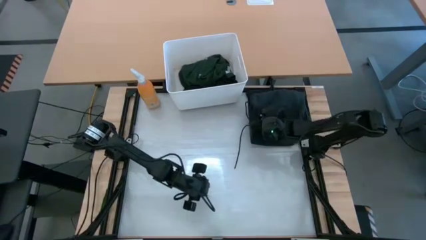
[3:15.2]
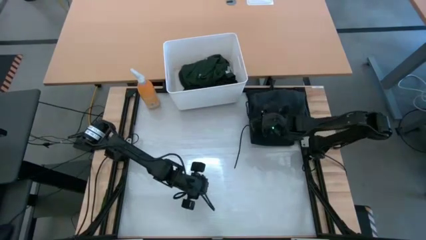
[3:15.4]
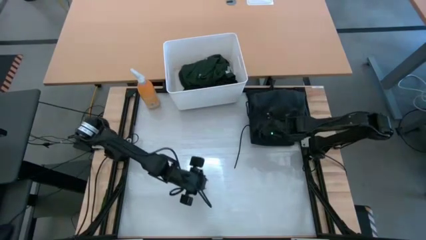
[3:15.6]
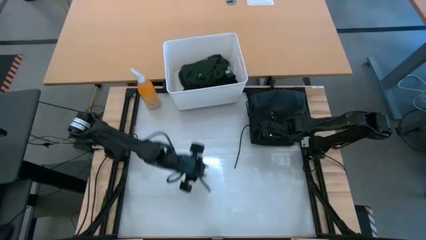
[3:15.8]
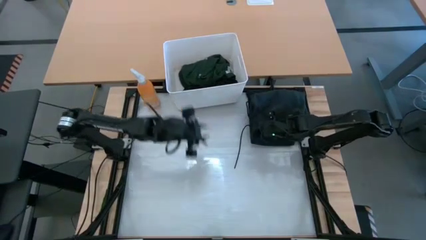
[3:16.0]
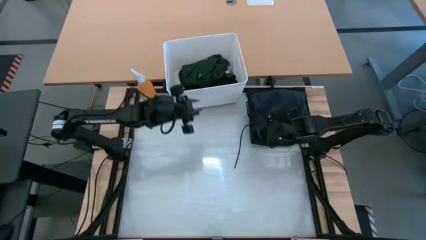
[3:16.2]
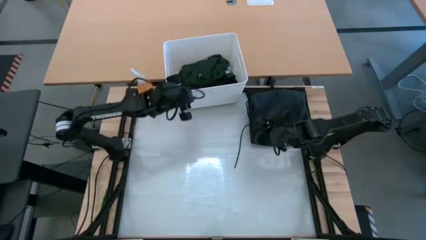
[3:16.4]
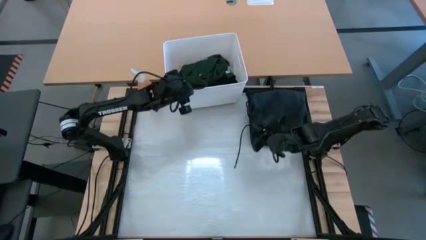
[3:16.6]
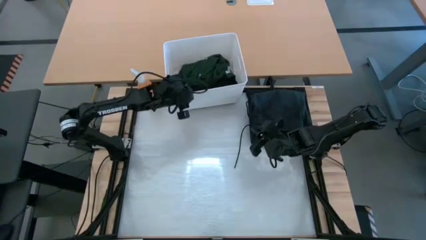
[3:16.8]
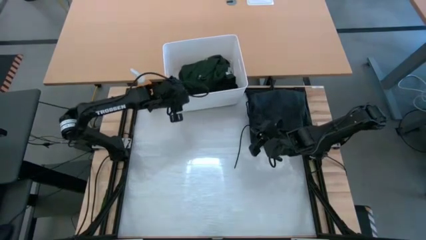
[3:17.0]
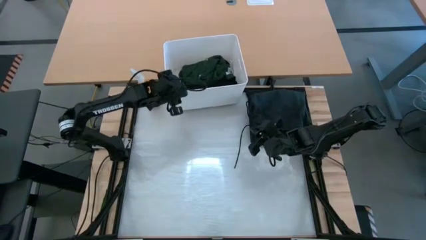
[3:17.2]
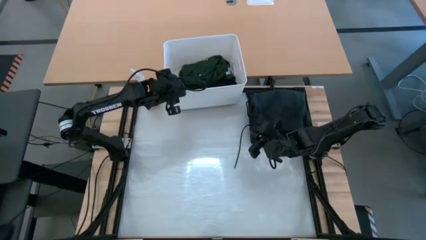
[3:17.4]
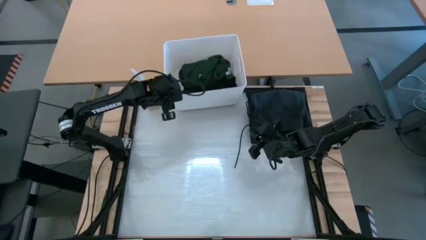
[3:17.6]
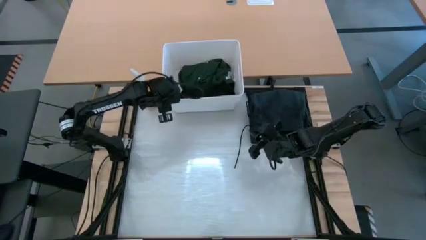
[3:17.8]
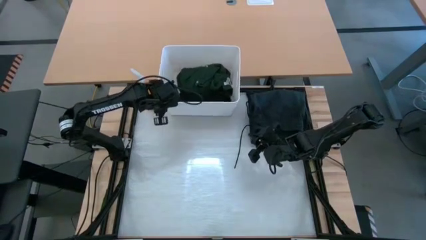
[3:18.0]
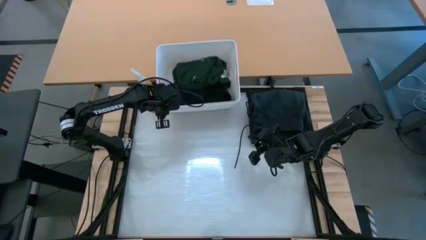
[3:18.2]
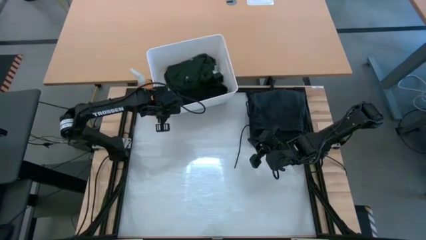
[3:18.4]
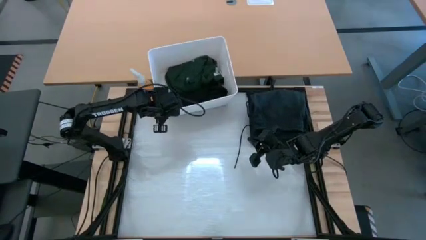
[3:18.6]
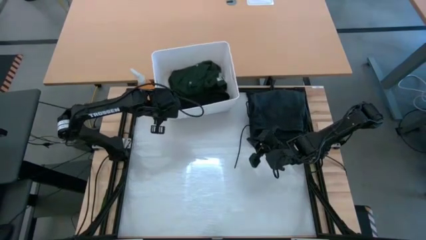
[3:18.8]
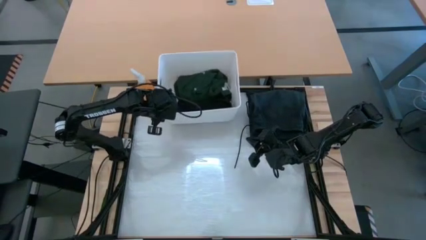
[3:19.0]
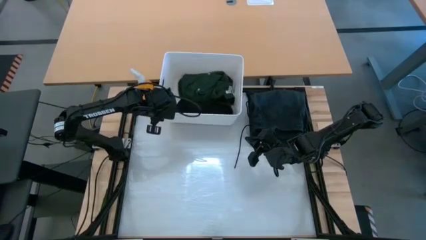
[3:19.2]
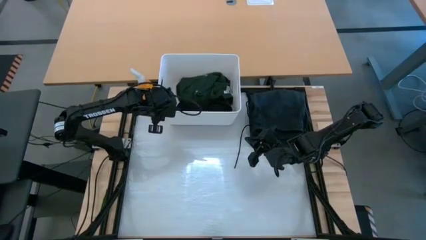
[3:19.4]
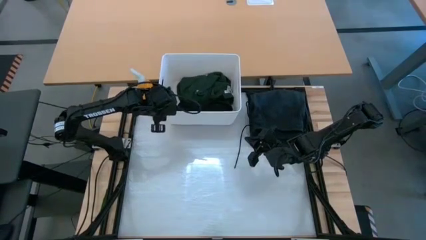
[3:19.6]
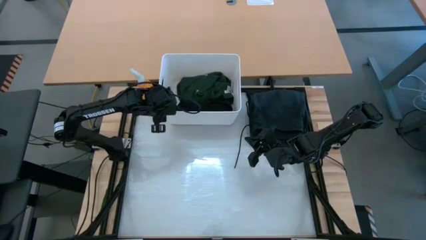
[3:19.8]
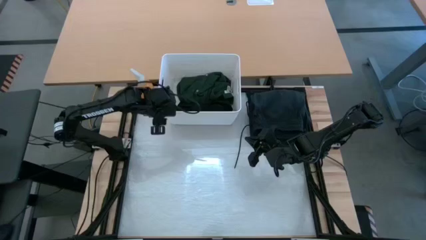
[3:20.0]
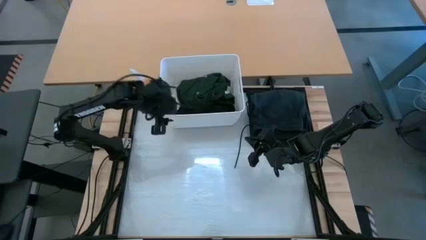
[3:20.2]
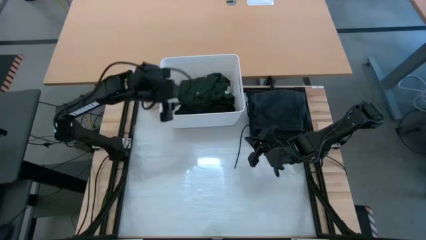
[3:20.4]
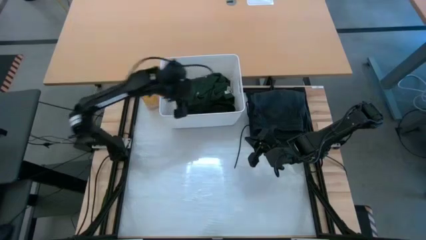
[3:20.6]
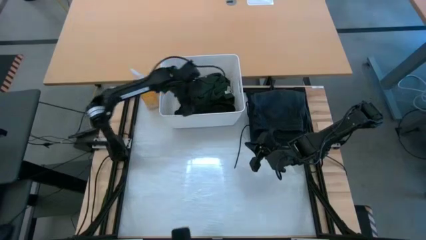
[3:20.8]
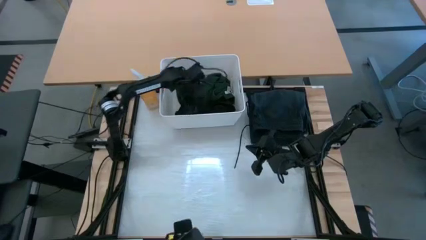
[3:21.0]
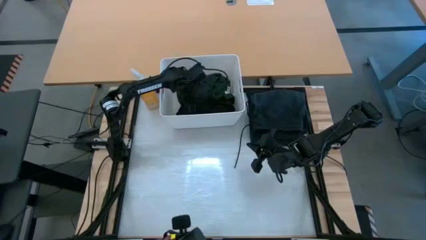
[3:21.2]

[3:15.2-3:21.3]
Task: Fold laundry
Remove the green polo from the white bin

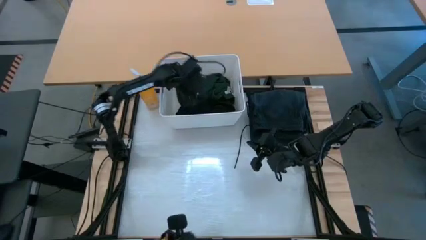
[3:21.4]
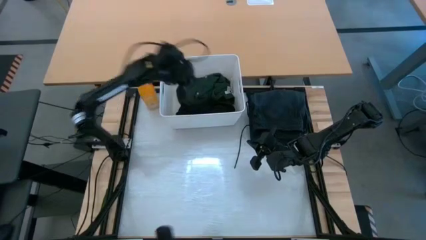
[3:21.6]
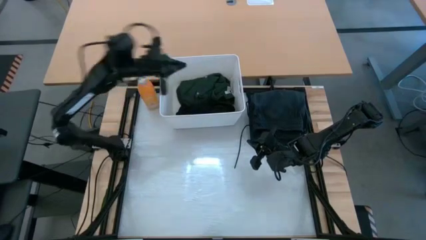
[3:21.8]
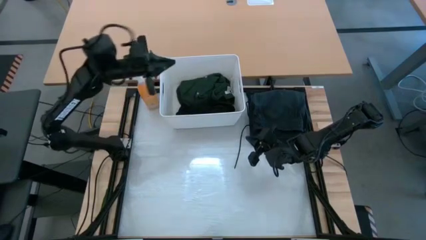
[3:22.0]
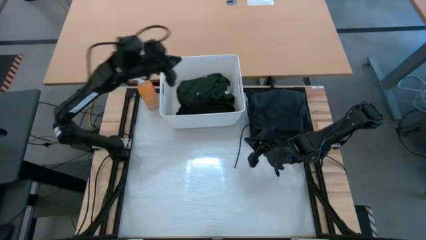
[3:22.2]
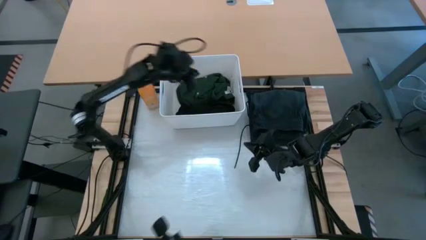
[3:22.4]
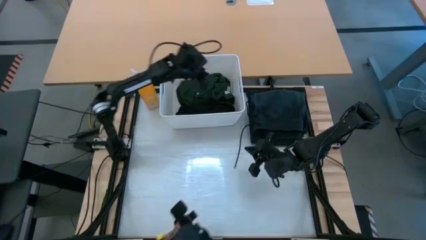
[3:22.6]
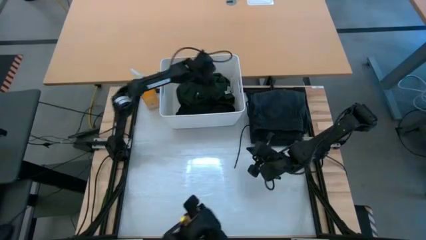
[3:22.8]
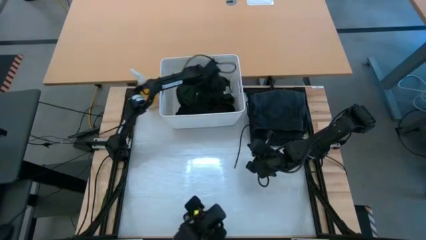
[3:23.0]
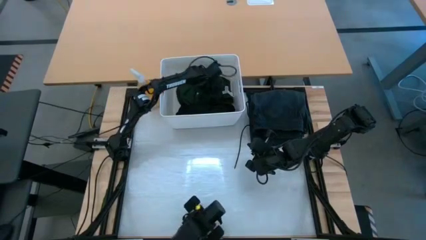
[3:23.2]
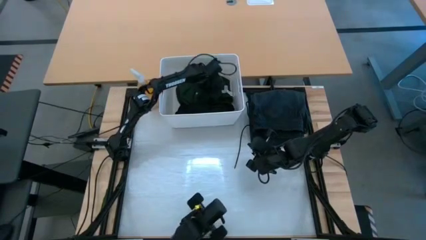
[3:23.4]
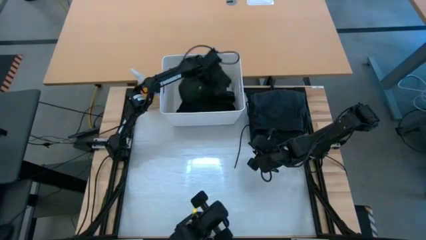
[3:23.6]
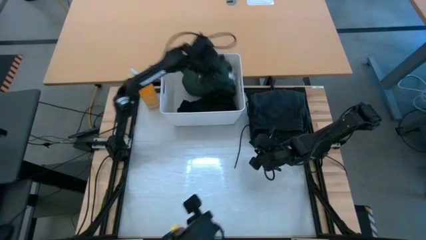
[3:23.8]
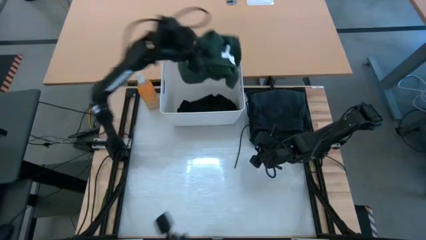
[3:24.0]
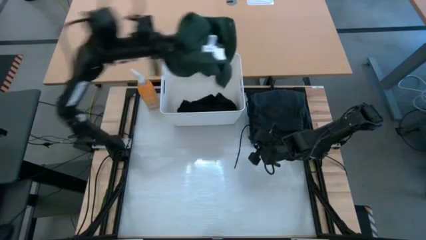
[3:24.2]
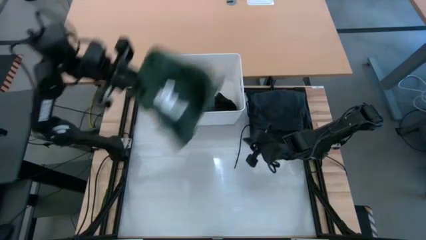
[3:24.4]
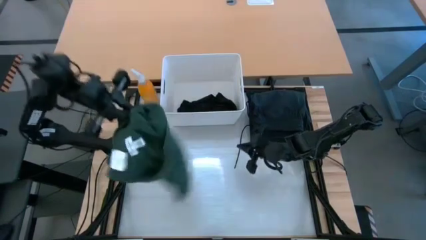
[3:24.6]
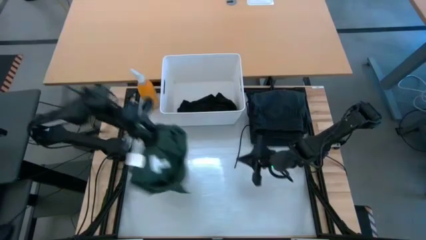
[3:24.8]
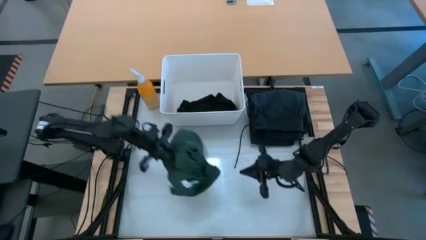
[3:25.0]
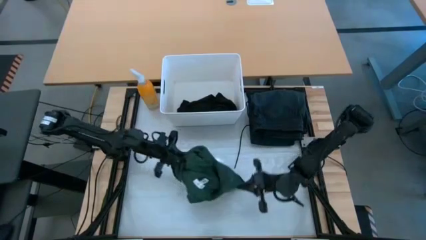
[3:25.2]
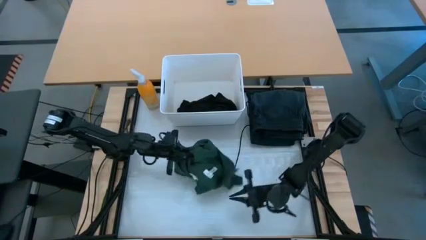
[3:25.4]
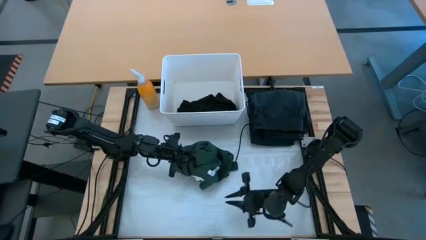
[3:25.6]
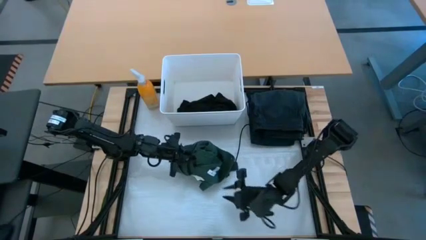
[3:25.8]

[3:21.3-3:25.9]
Remove the green polo from the white bin

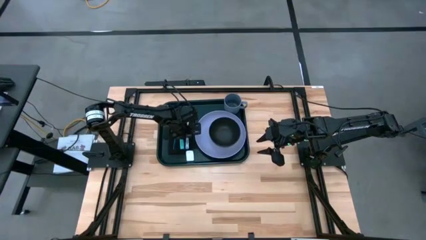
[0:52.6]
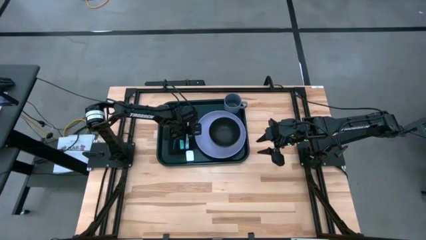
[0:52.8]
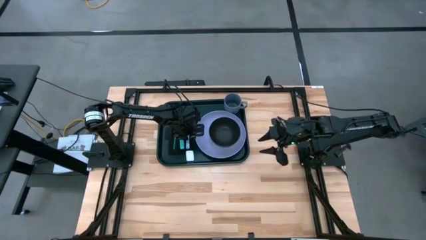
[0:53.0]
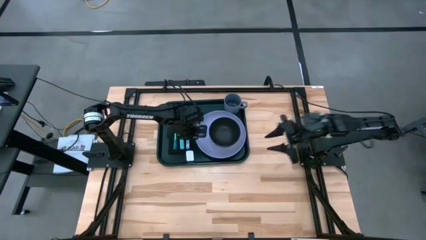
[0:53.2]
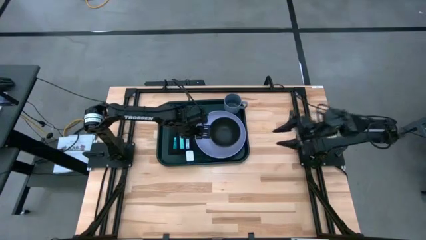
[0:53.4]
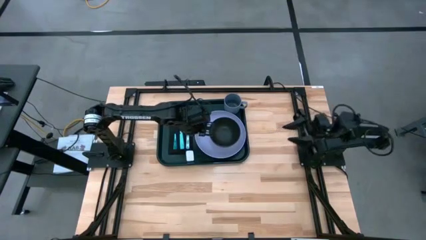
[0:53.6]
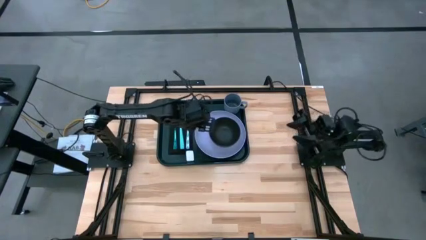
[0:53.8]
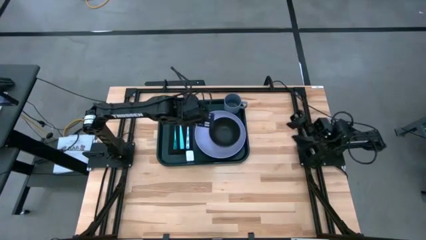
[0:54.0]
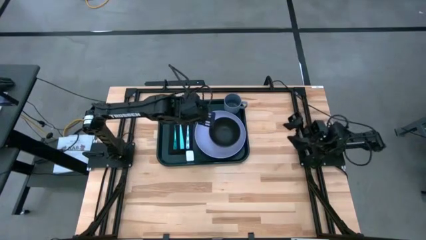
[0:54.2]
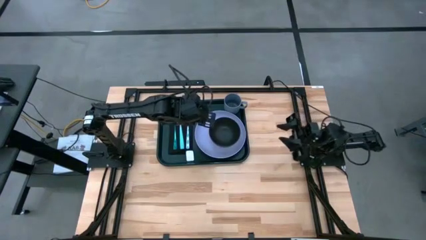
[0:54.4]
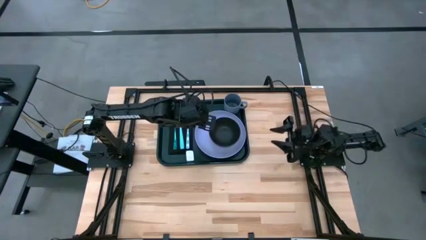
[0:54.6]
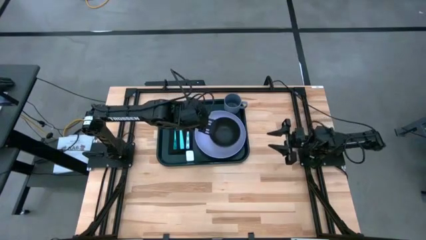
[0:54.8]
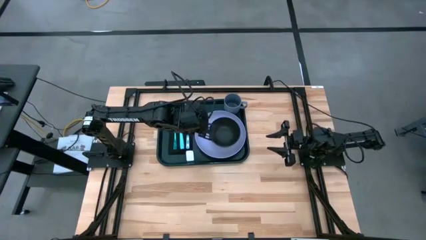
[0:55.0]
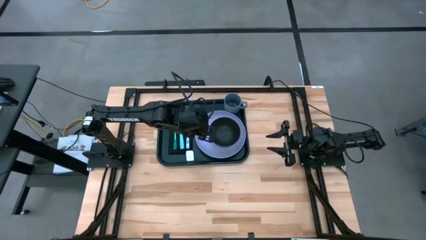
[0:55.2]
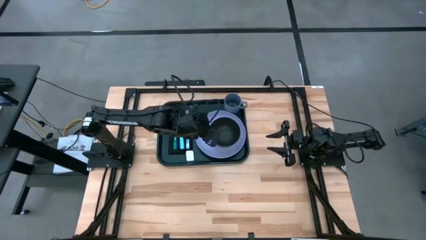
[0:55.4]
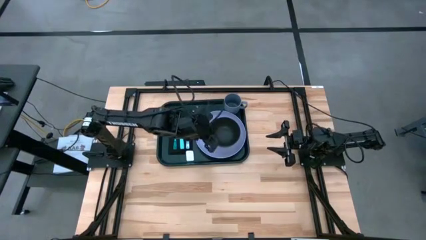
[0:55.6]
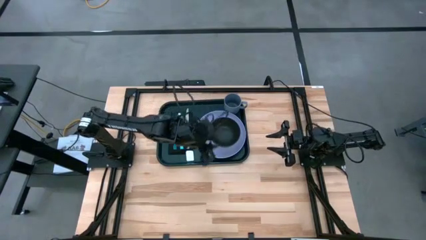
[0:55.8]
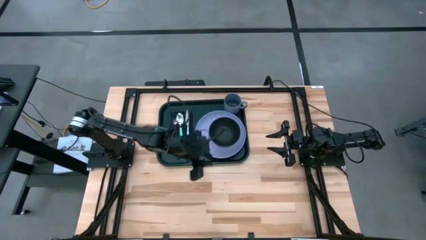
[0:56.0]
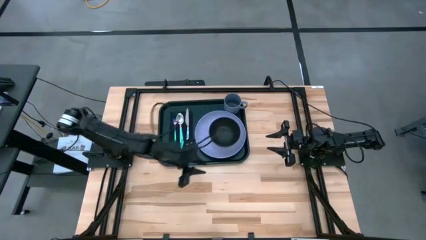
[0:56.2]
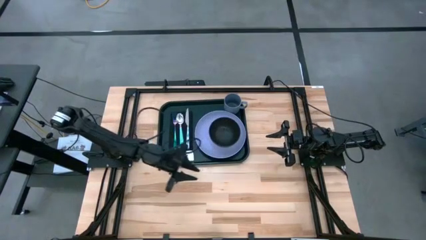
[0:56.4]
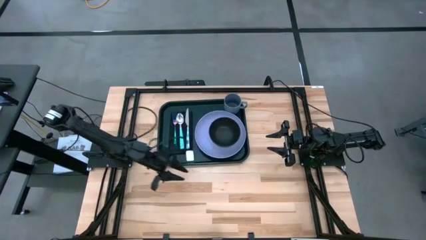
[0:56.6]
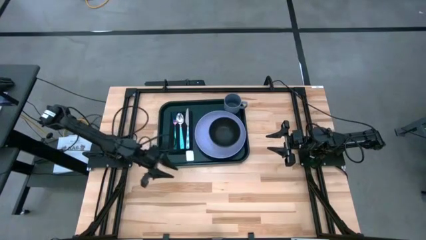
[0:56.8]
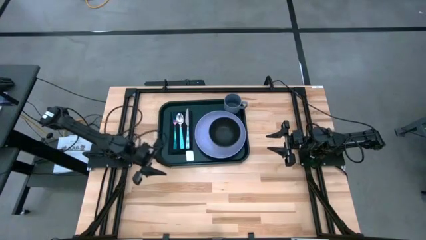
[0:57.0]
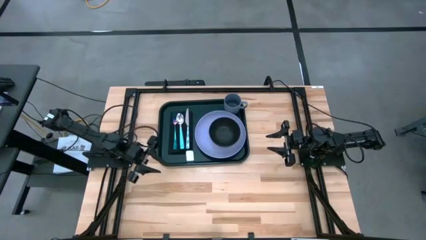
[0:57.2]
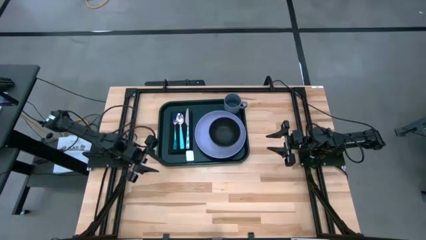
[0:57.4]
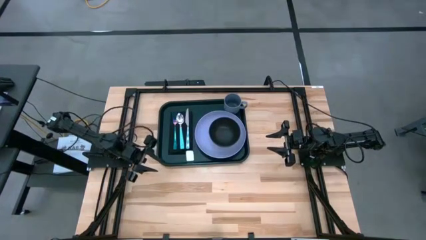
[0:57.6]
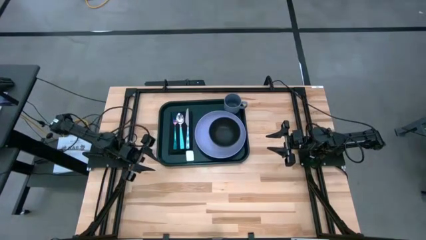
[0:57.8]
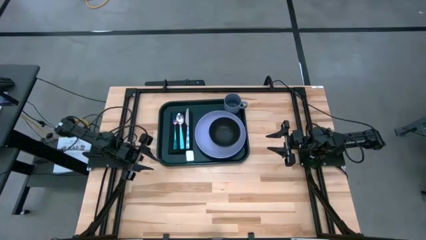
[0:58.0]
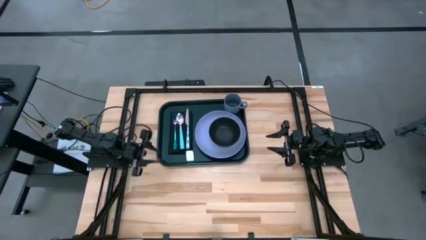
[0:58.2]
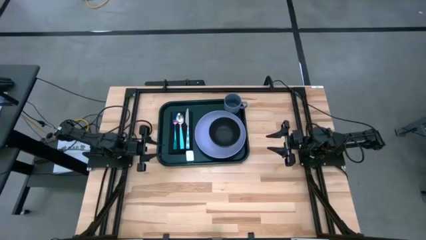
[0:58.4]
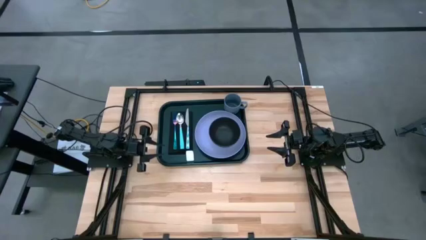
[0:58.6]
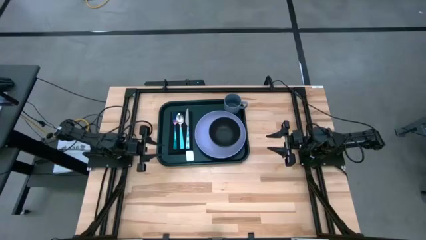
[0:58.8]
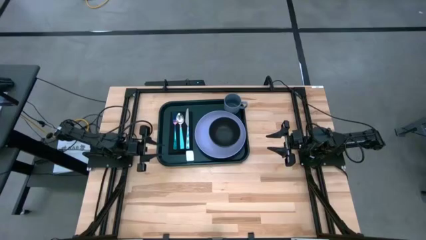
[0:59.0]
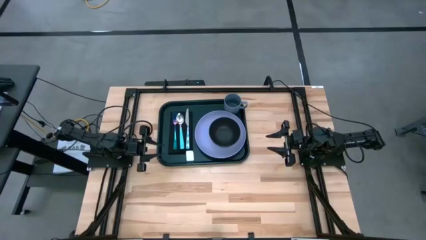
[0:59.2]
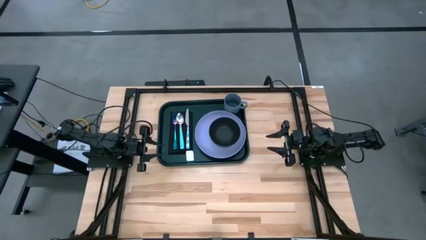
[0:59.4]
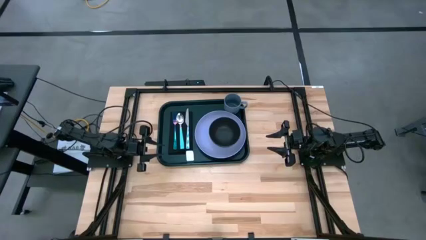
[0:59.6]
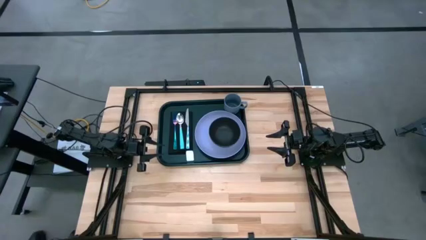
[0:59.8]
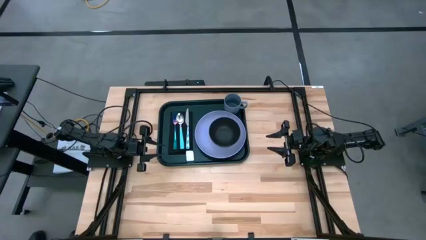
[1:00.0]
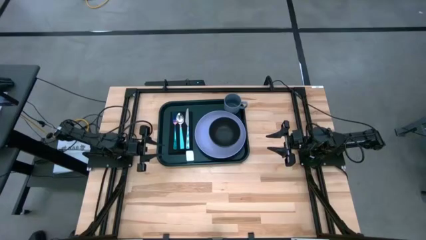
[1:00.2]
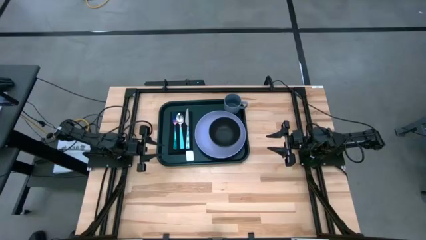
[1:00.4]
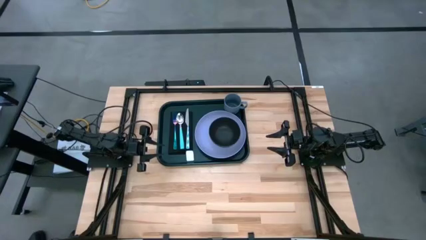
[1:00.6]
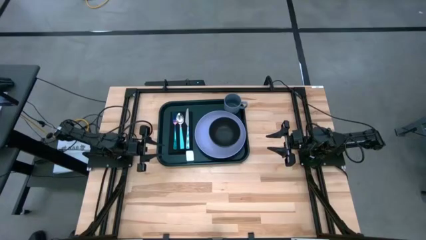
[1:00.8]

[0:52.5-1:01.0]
Task: Set up tray
Return to Home Position
